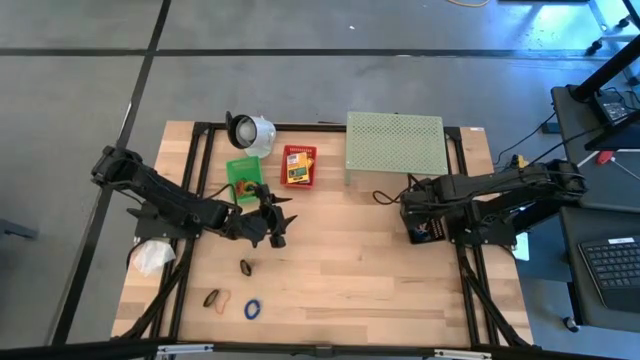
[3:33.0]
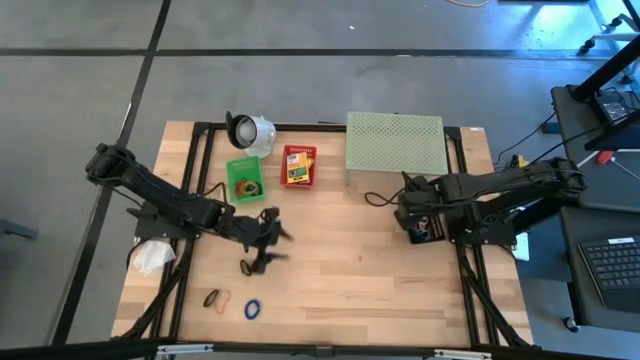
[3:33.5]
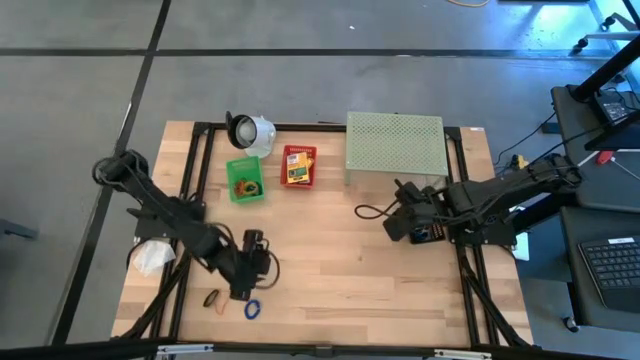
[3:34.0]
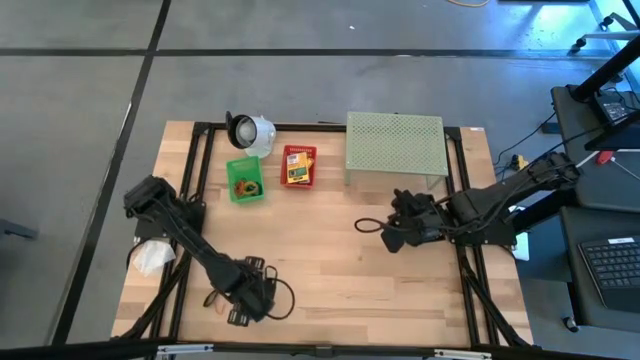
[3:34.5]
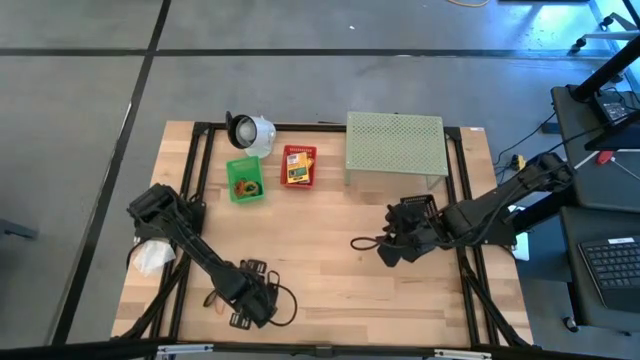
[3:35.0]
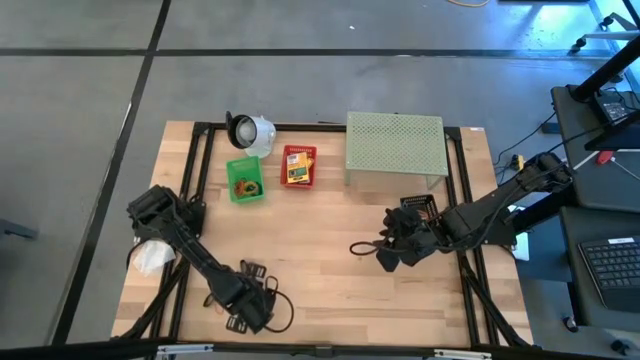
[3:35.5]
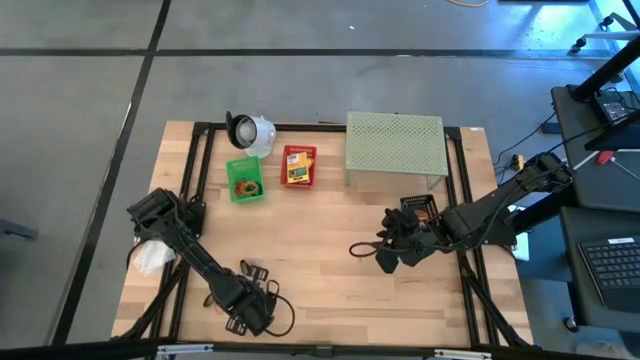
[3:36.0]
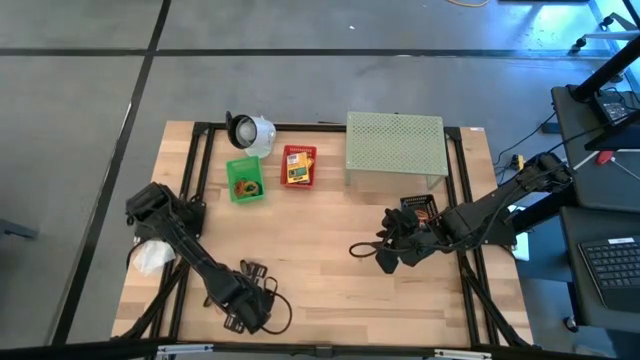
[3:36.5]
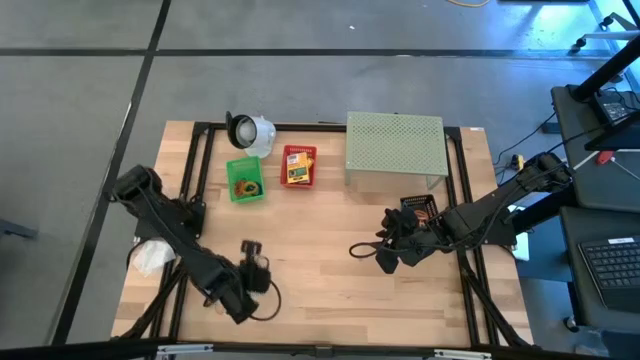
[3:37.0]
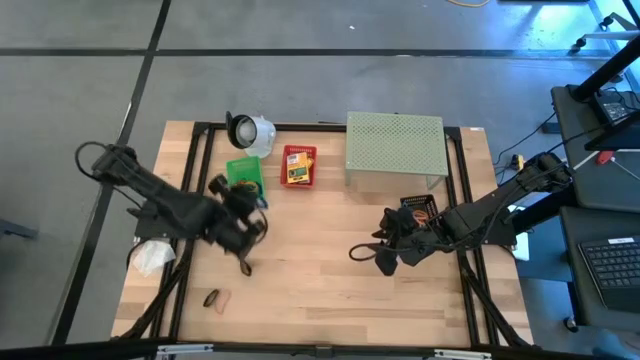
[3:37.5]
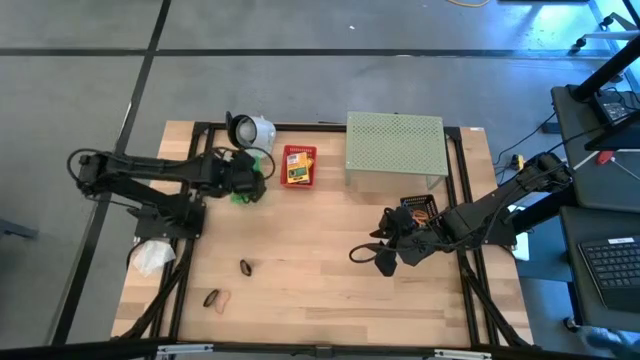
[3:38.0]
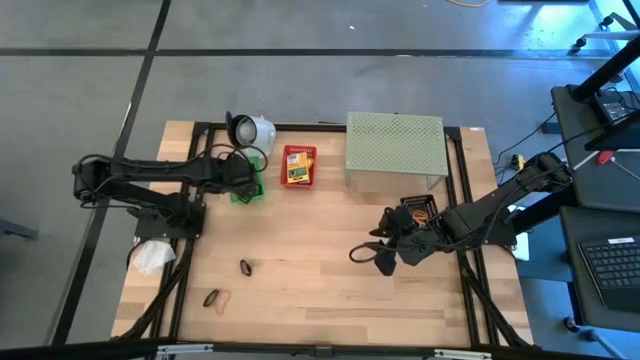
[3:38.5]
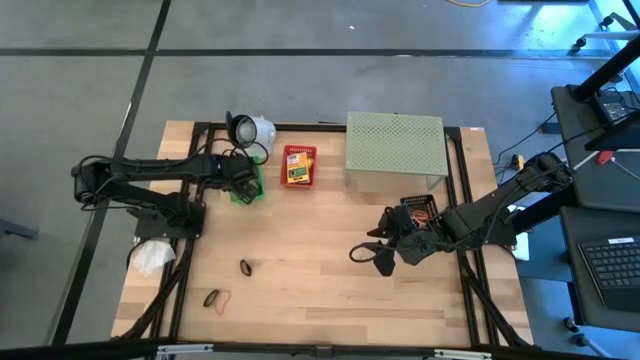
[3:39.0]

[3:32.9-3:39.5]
Task: Pick & Place Office Desk Supplies
Put the blue spring keychain into the green basket

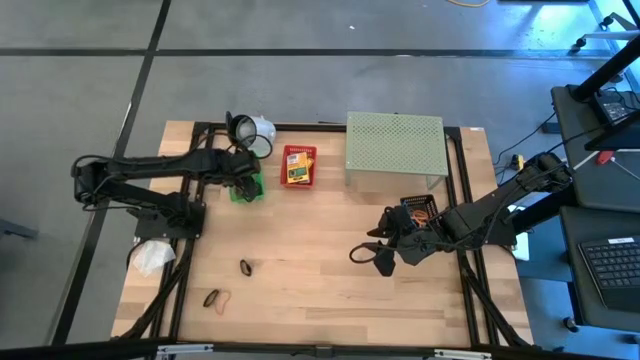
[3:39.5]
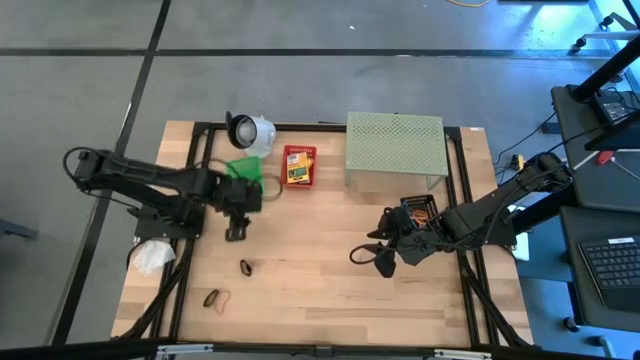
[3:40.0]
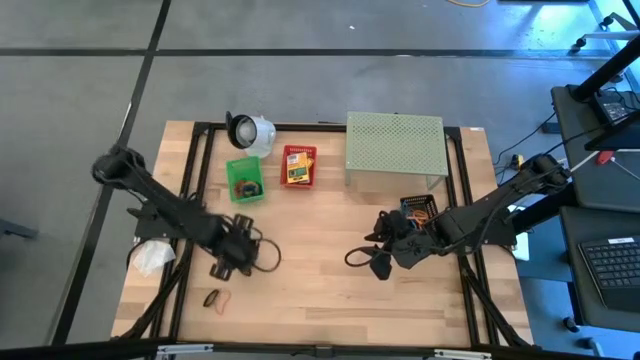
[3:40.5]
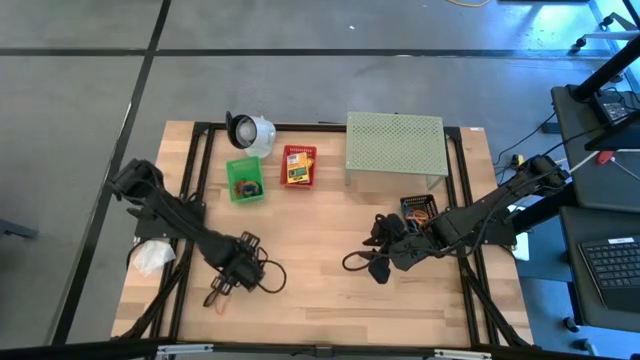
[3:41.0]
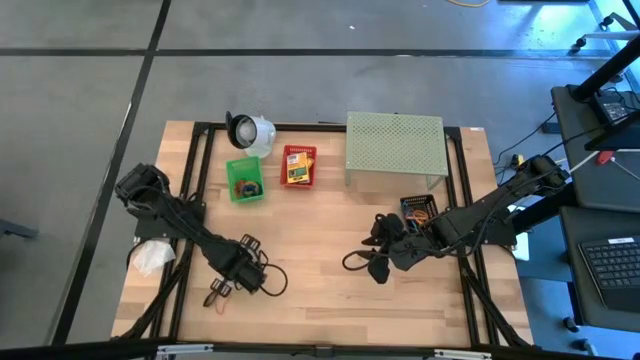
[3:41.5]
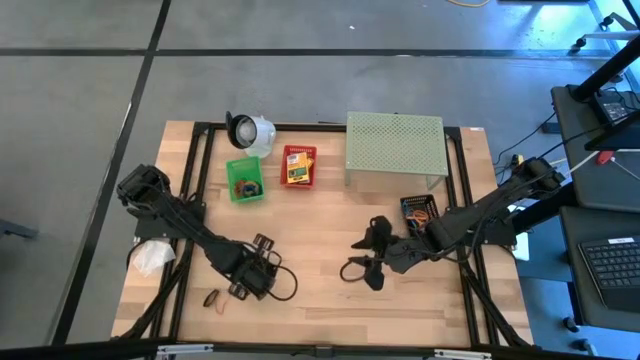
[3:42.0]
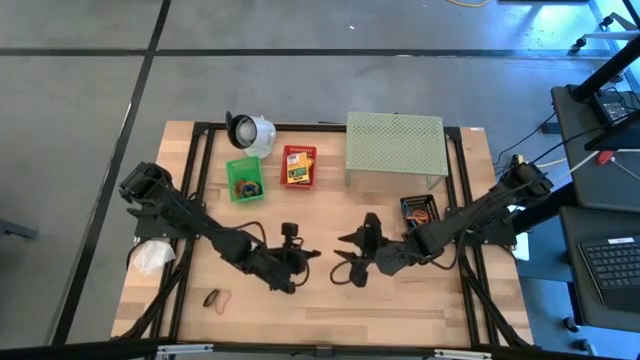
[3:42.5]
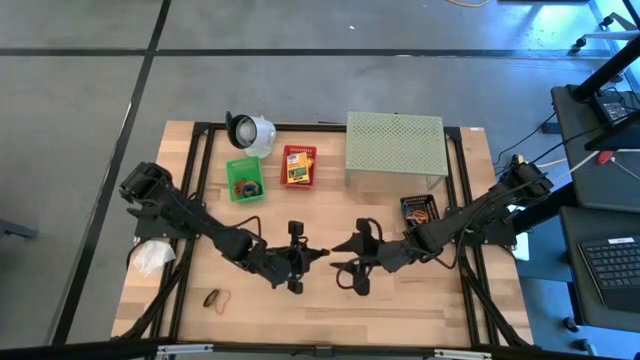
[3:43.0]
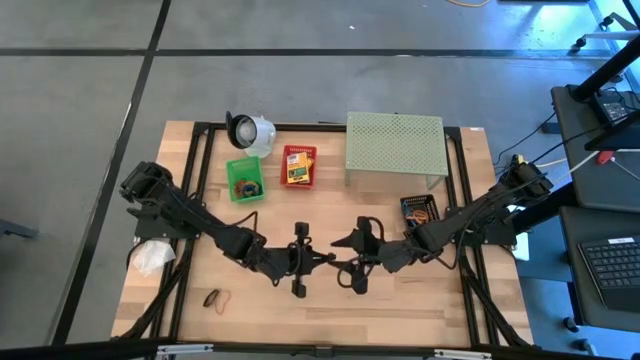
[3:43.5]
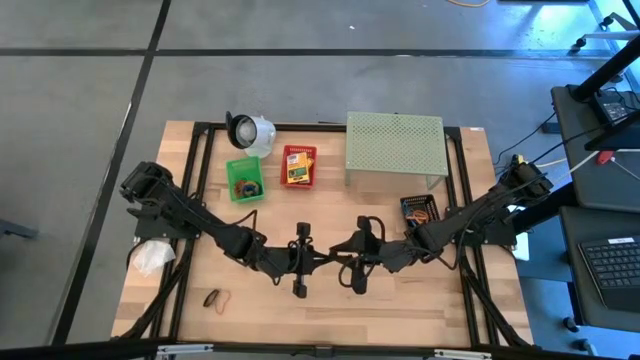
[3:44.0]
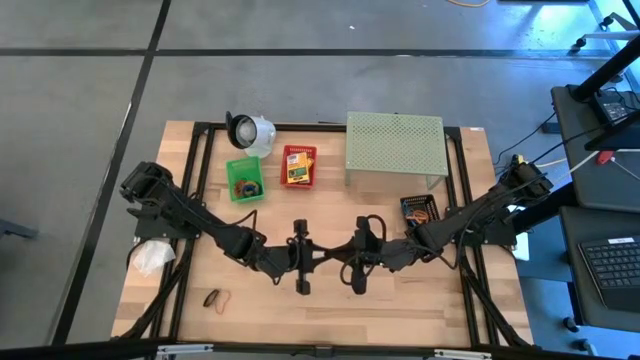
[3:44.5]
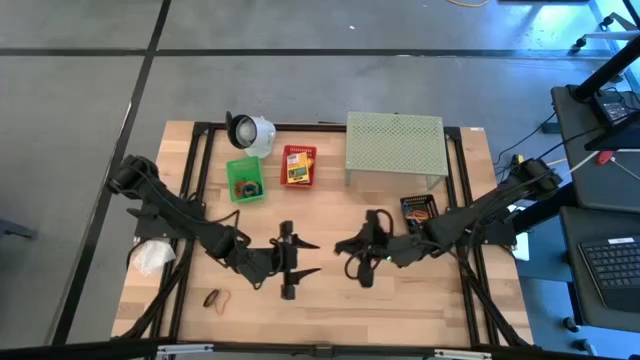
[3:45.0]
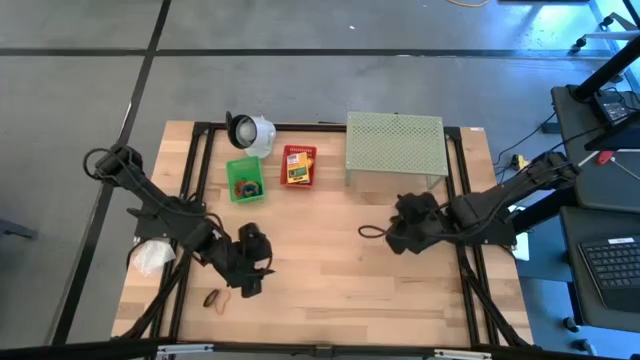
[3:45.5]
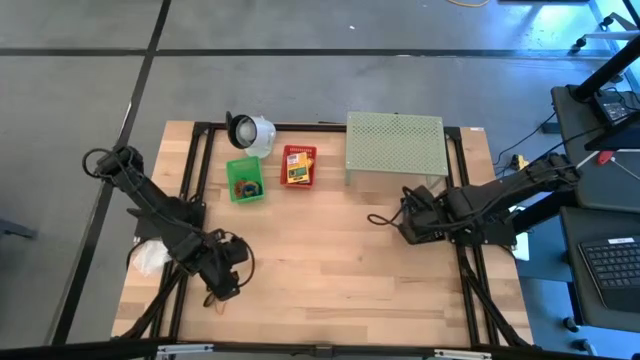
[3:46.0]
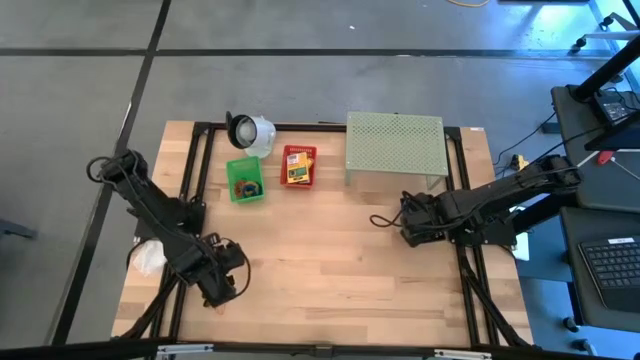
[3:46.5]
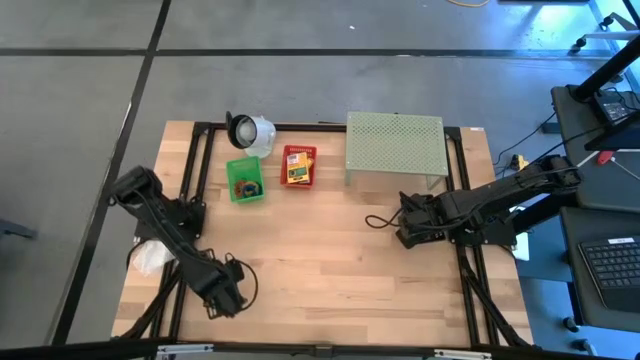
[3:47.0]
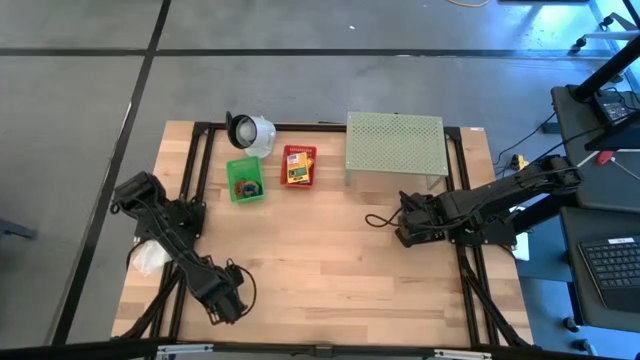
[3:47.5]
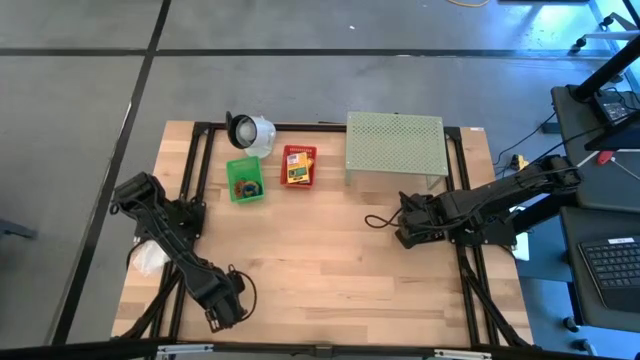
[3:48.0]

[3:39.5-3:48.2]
Put the top black rubber band into the black basket

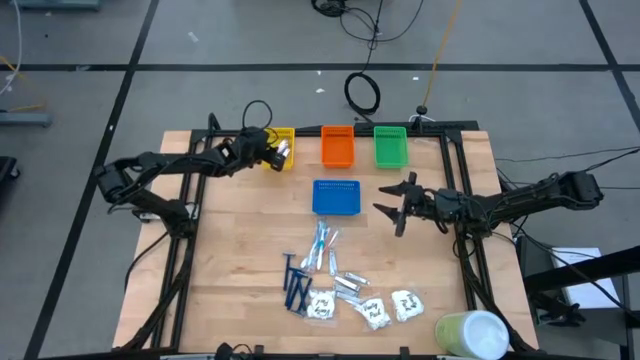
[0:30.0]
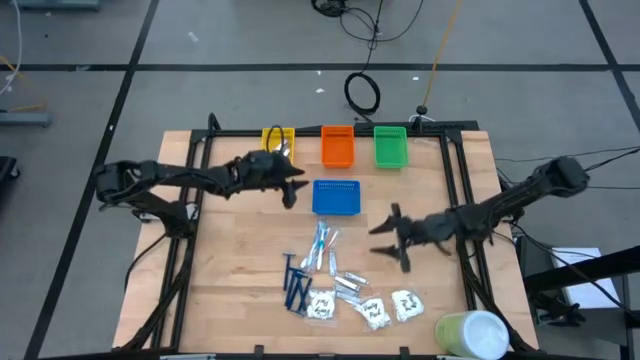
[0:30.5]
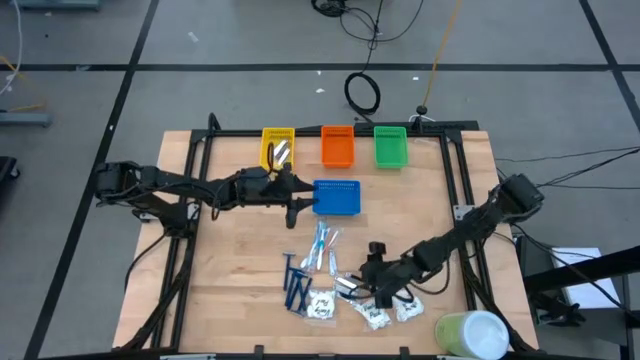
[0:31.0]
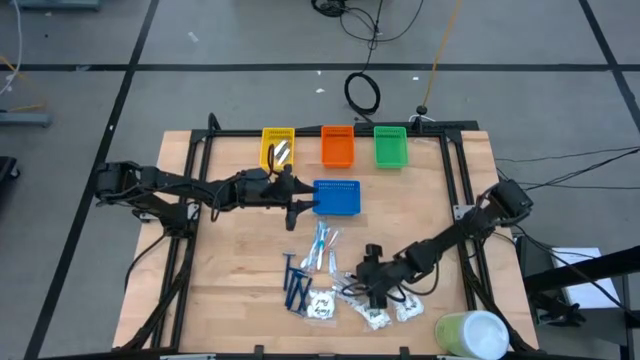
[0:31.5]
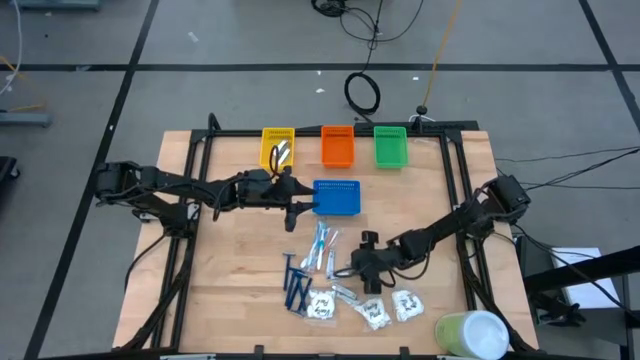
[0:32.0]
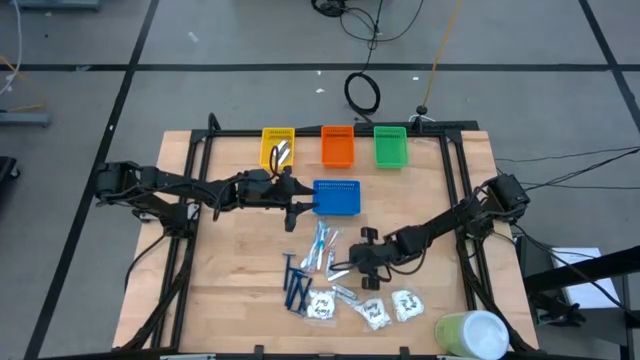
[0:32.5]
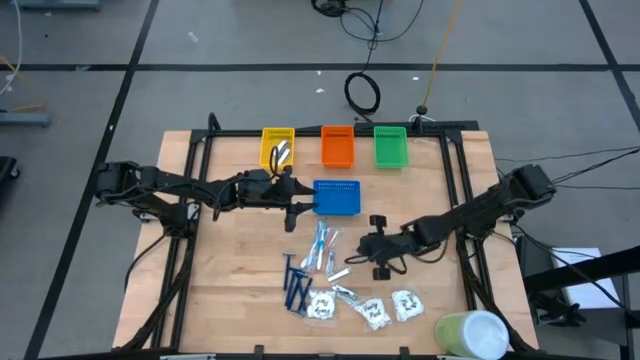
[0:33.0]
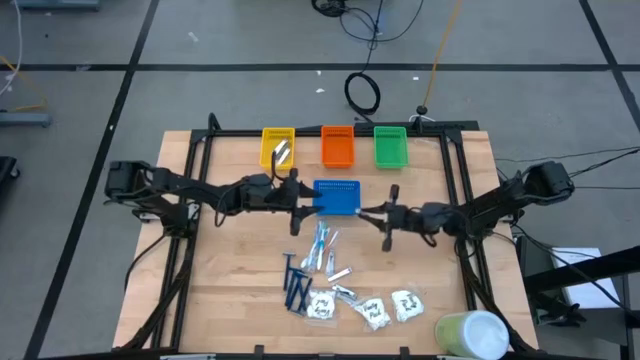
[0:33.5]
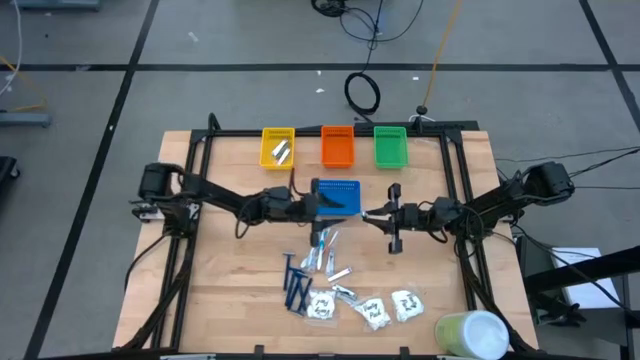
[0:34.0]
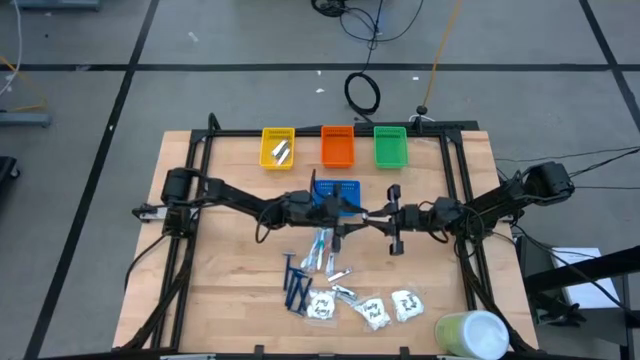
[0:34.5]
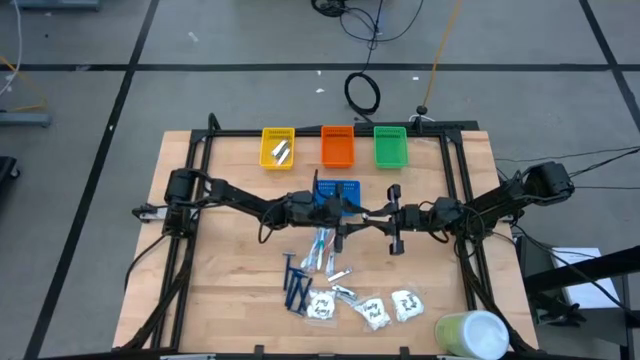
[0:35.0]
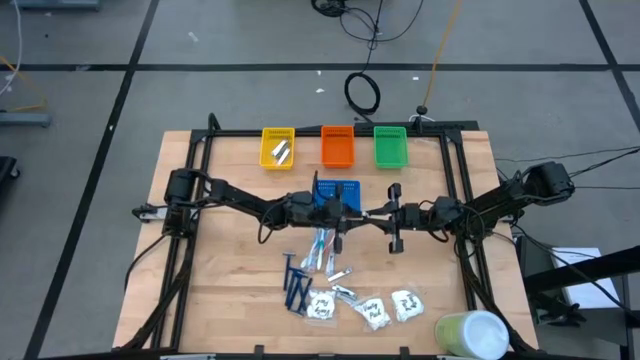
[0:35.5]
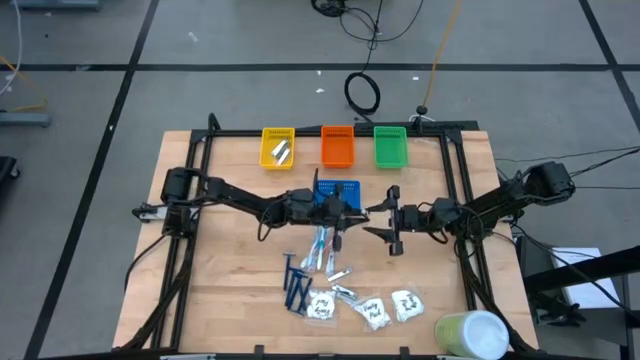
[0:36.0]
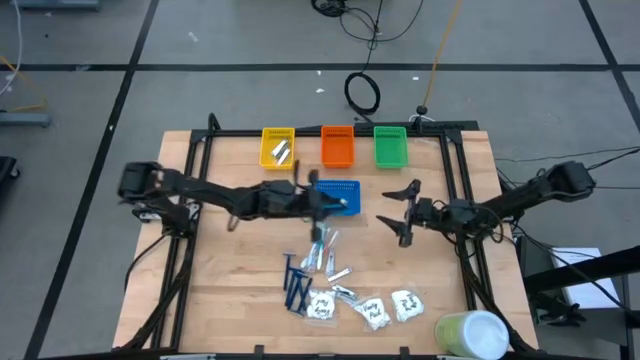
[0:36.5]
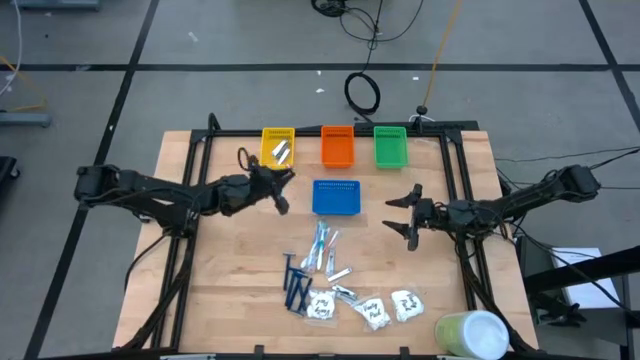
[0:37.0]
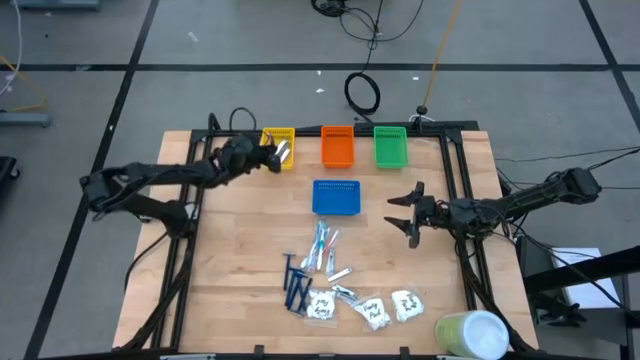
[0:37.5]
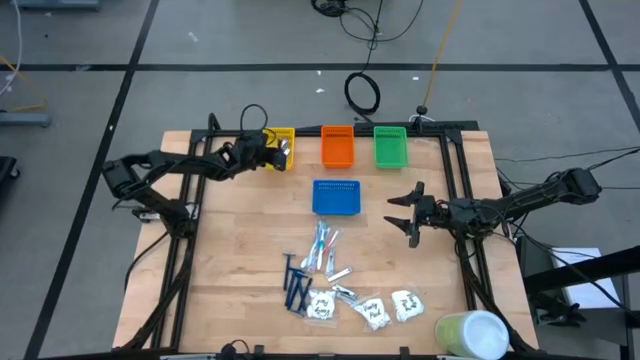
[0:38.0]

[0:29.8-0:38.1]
Task: Pick & Place Travel size toiletries
Put the silver nail cutter into the yellow basket
